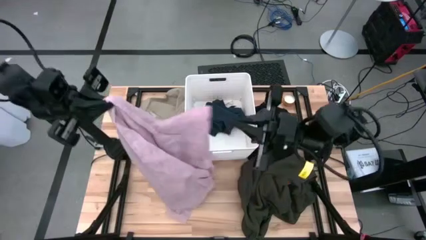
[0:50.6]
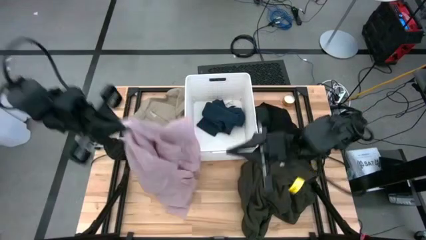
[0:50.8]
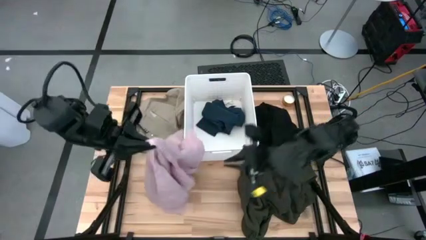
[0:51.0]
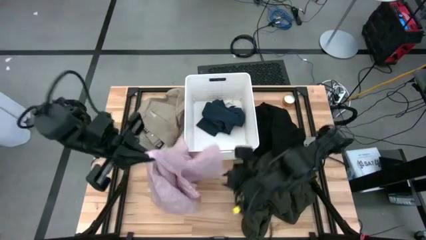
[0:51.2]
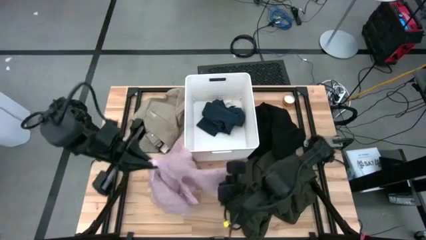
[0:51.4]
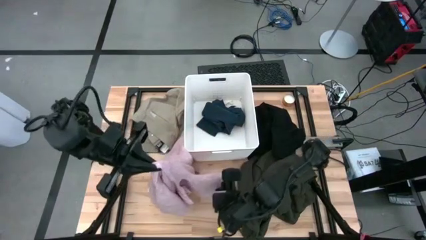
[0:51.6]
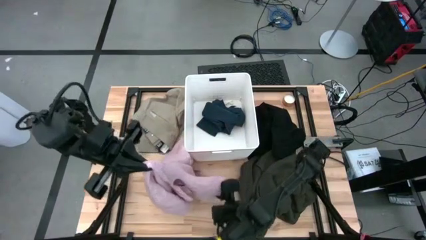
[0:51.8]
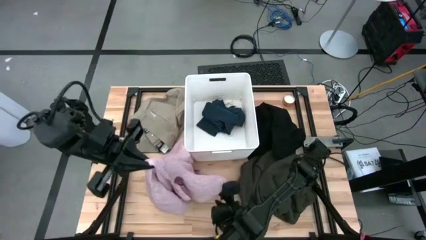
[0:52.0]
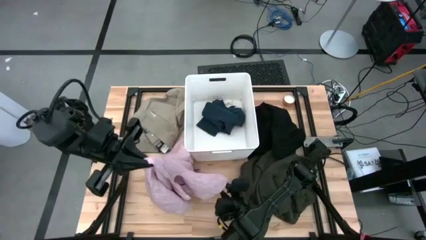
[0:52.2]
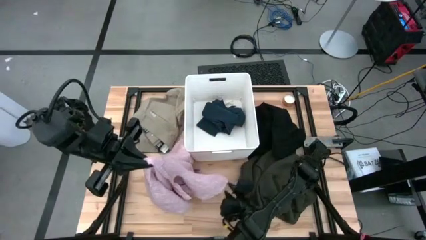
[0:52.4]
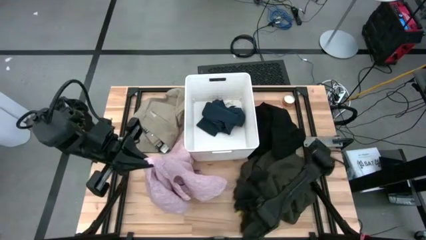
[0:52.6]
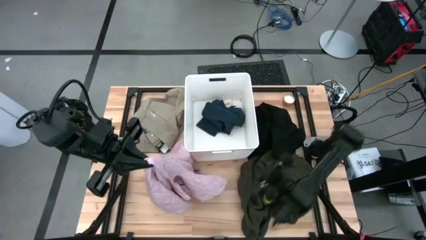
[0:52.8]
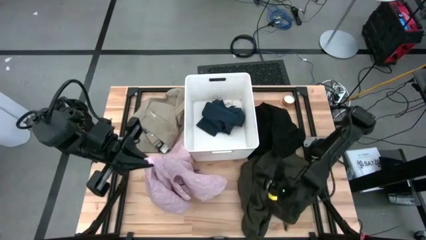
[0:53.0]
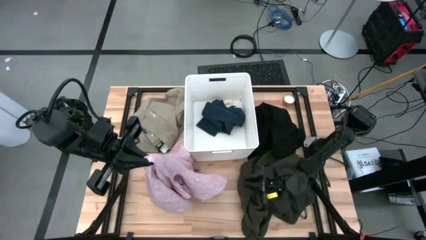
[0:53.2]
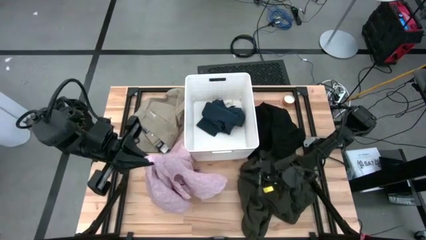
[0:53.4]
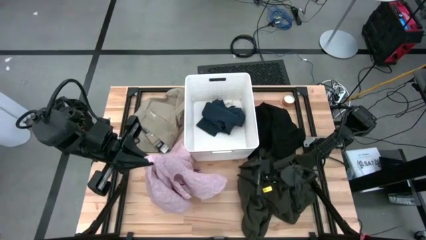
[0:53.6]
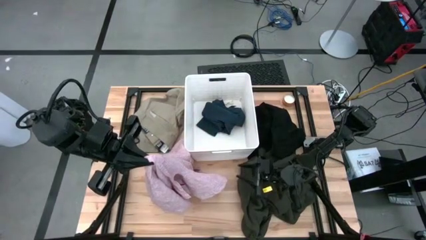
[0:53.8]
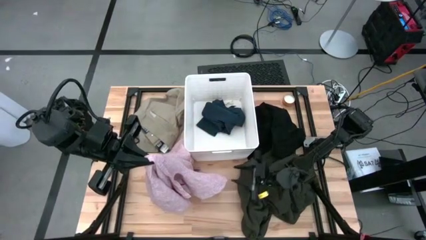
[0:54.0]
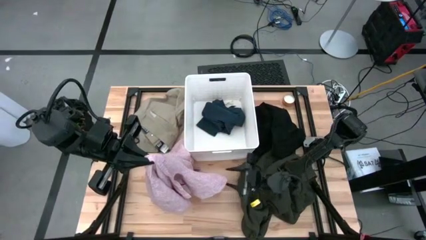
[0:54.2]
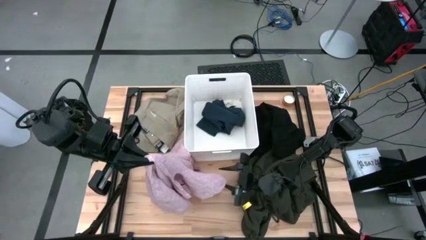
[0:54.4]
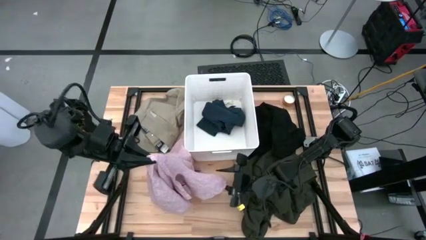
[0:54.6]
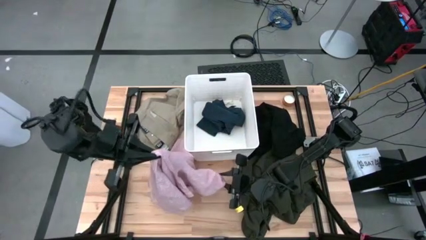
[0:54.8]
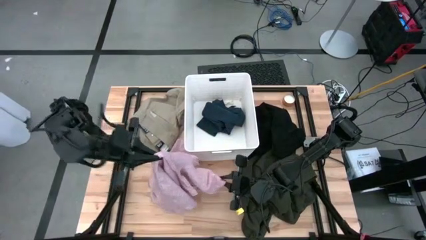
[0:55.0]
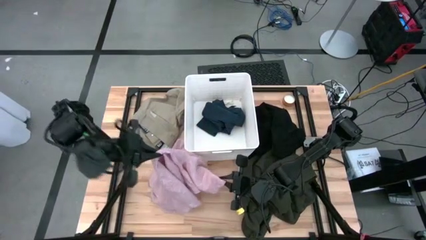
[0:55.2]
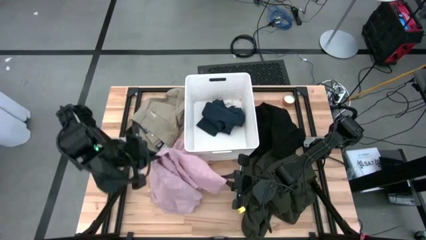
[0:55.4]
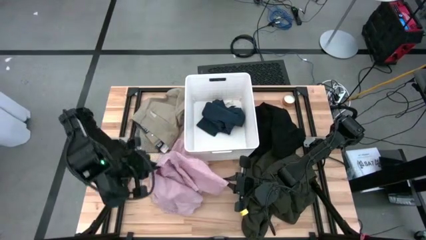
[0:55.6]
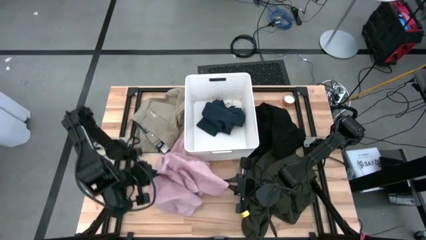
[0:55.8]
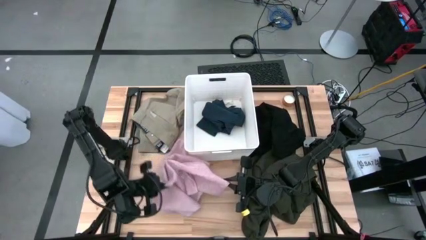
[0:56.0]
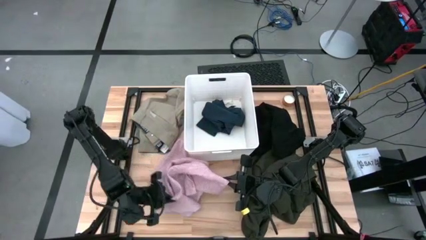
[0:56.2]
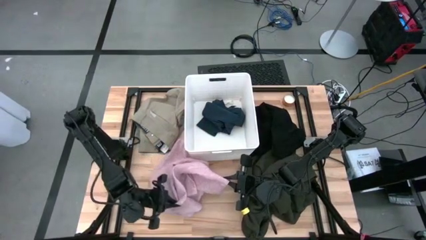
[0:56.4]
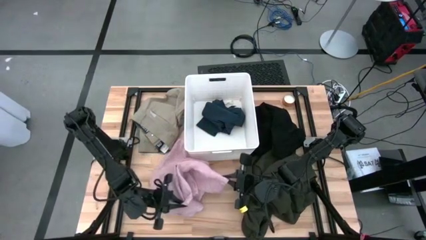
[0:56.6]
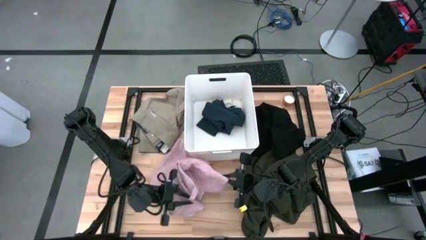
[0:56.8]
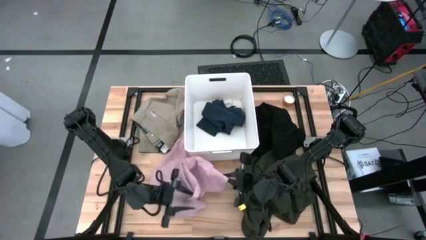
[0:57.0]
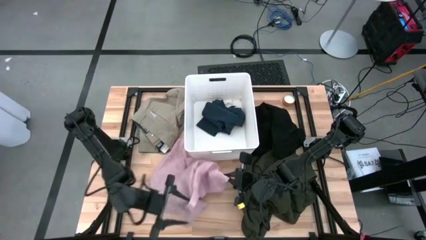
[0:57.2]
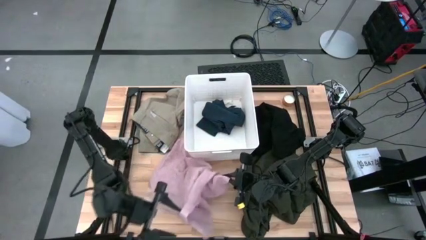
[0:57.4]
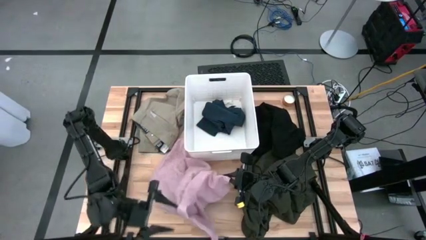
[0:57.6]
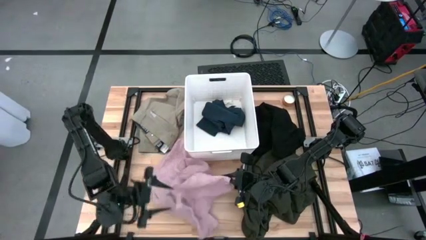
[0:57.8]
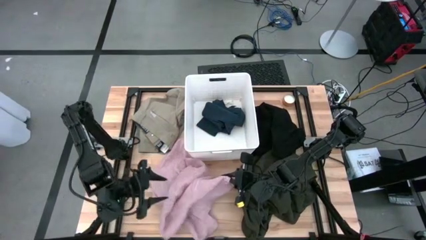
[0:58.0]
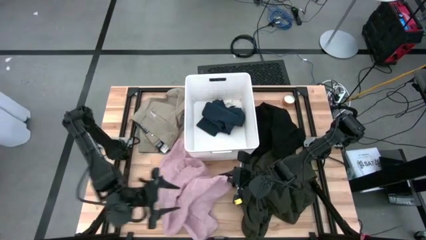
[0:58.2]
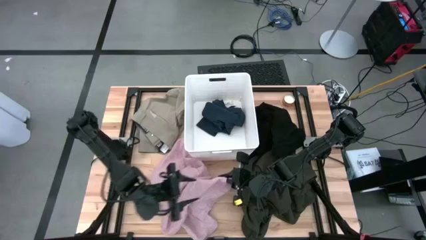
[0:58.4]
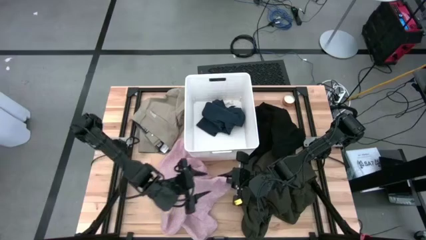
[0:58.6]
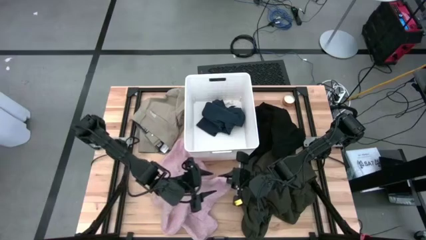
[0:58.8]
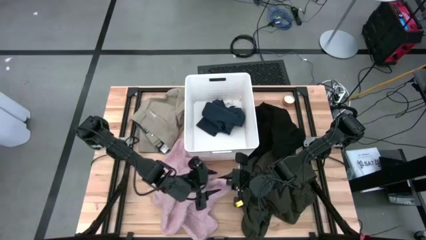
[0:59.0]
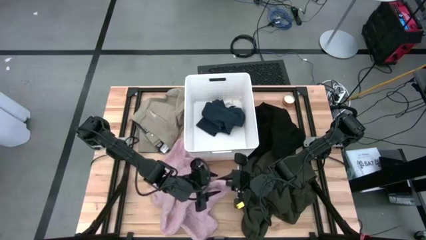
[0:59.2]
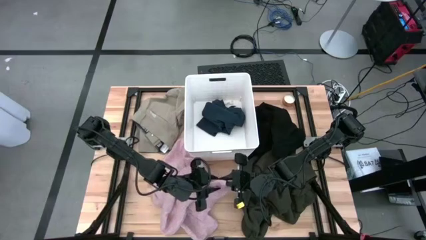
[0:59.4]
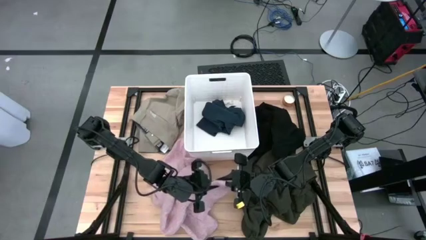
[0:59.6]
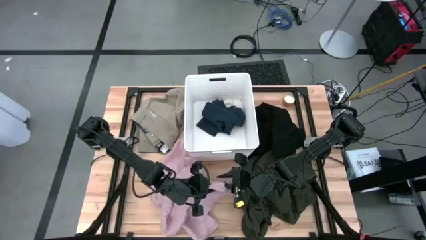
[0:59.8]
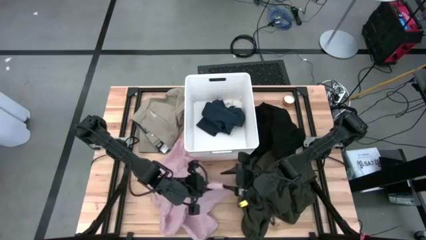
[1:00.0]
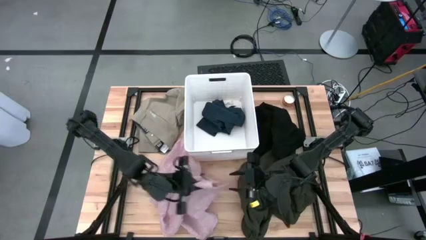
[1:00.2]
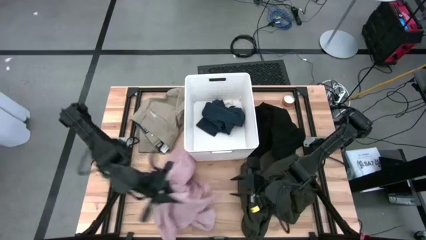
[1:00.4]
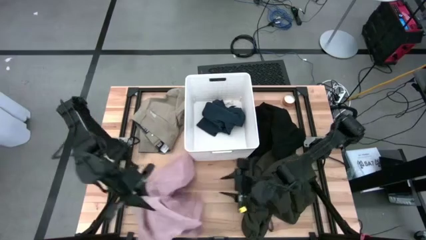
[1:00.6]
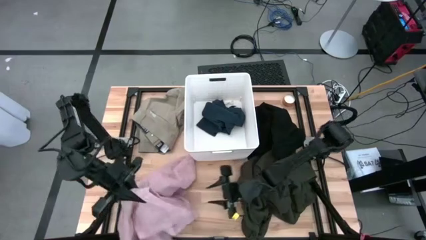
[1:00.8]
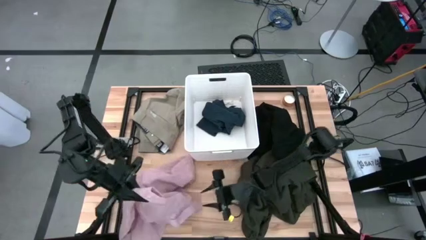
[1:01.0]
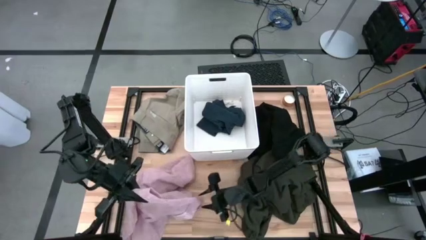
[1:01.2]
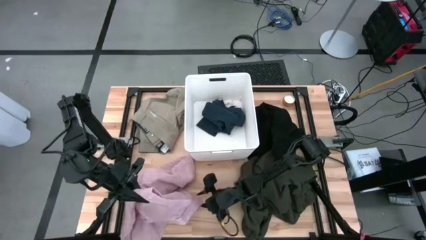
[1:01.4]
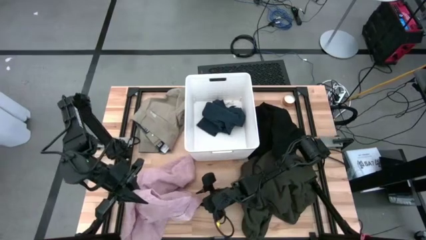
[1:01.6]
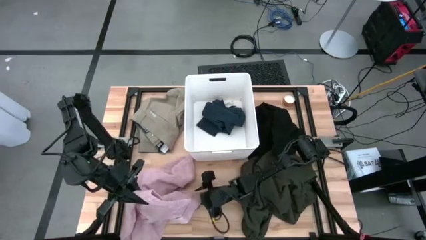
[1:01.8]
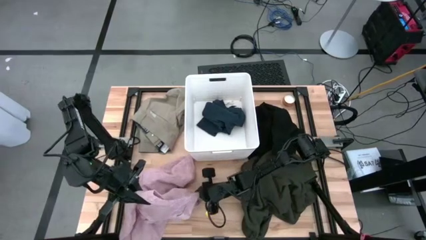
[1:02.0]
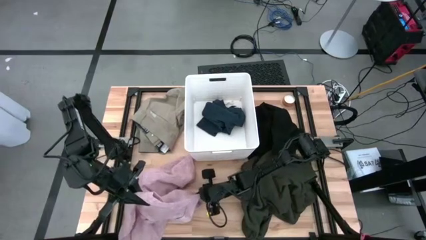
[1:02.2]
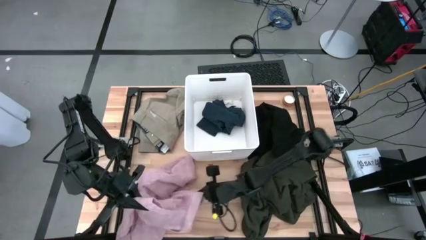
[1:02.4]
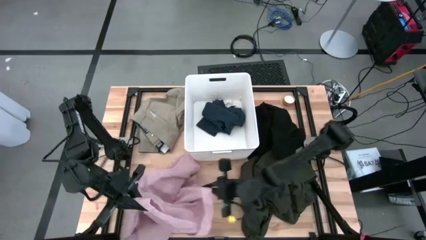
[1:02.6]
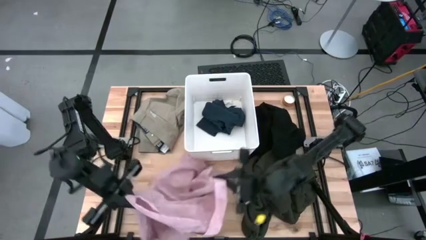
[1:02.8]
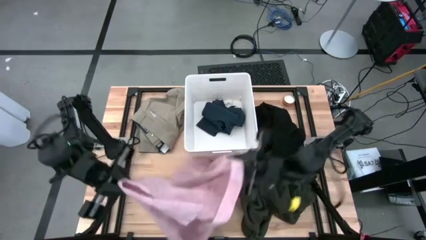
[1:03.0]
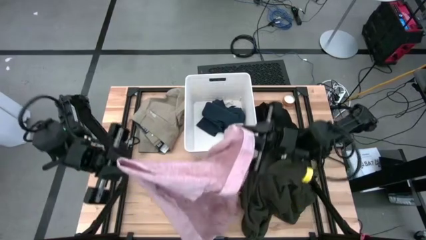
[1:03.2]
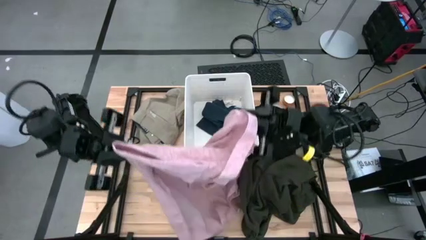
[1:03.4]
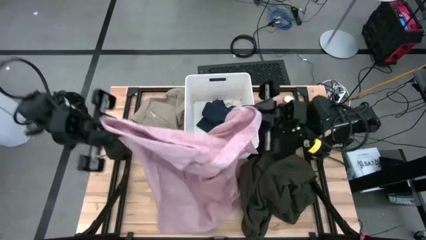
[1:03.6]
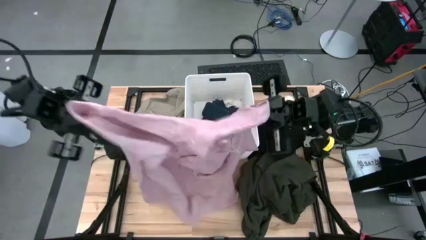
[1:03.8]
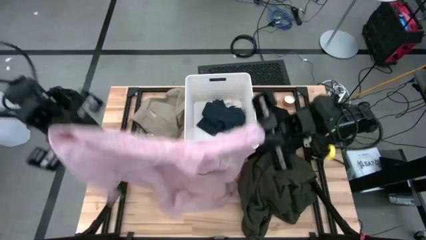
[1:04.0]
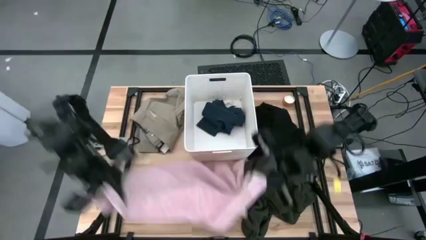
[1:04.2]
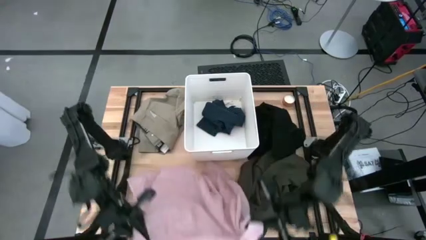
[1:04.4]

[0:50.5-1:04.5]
Task: Sort clothes
Put the pink shirt into the white laundry bin

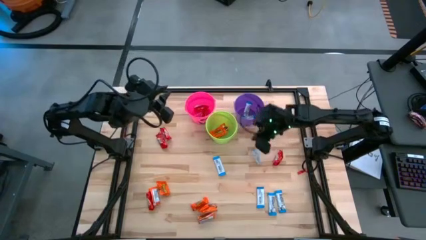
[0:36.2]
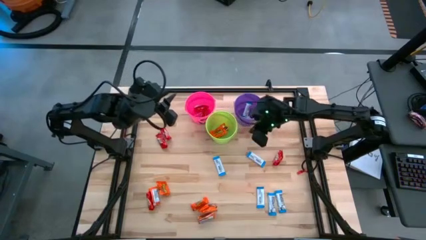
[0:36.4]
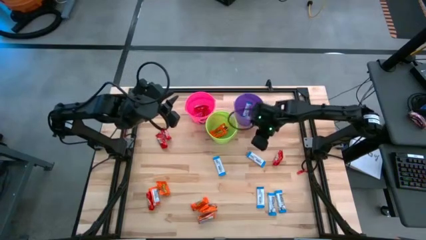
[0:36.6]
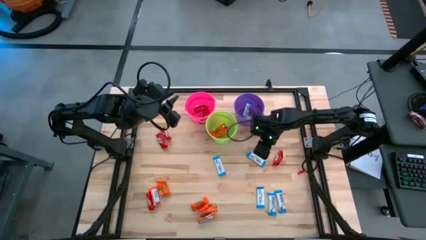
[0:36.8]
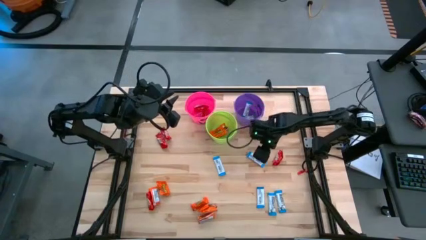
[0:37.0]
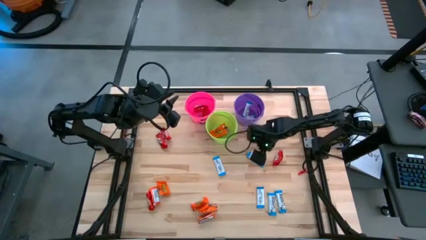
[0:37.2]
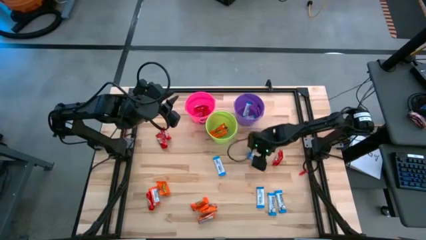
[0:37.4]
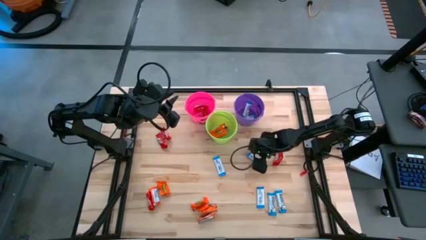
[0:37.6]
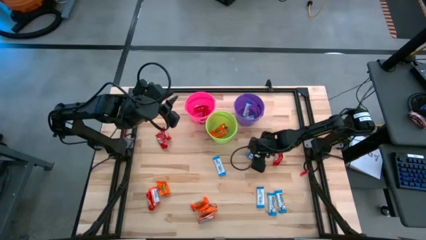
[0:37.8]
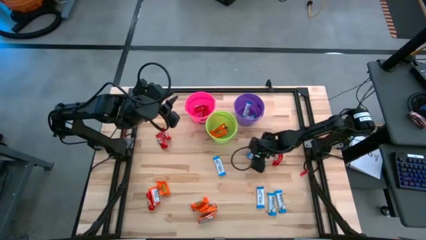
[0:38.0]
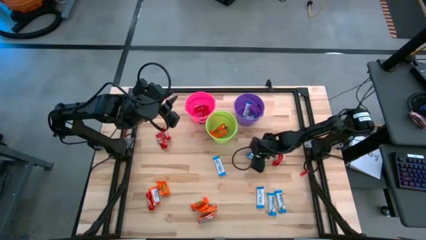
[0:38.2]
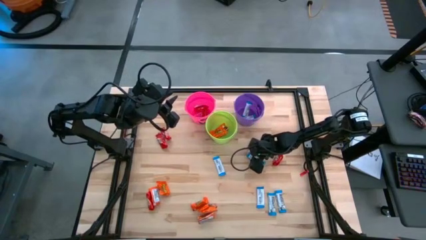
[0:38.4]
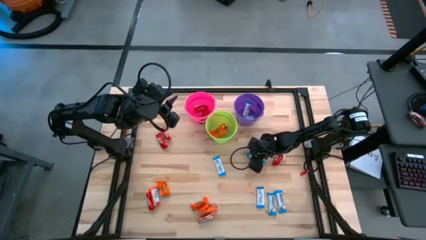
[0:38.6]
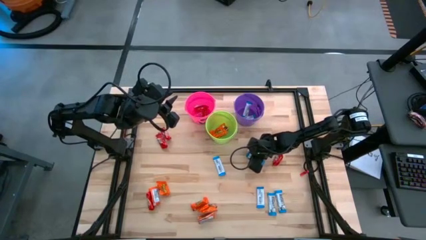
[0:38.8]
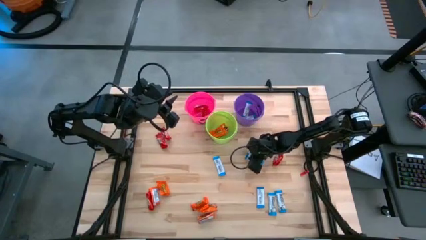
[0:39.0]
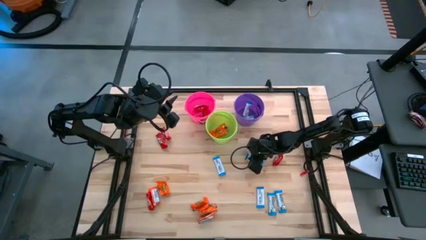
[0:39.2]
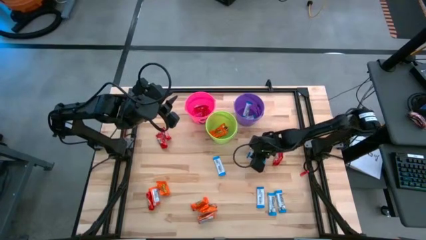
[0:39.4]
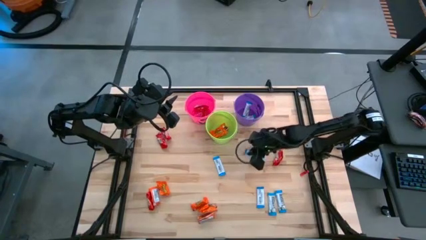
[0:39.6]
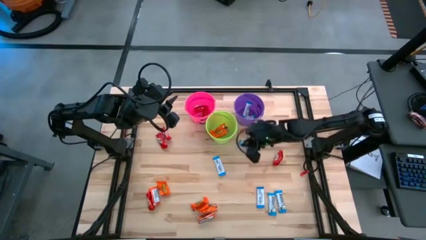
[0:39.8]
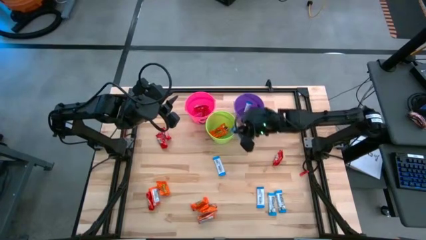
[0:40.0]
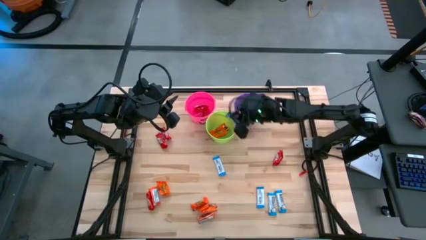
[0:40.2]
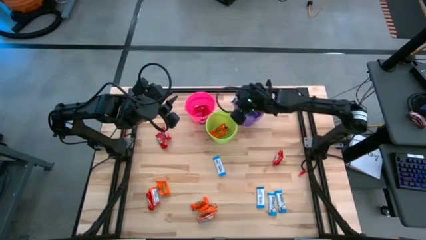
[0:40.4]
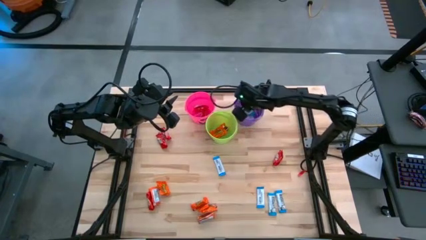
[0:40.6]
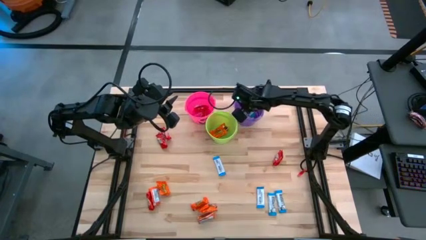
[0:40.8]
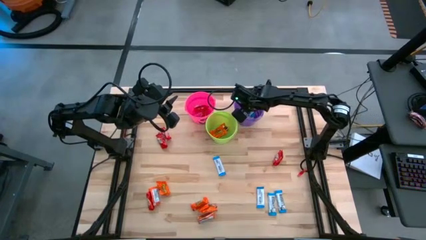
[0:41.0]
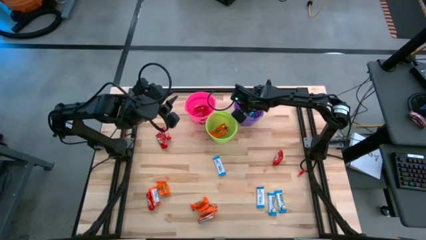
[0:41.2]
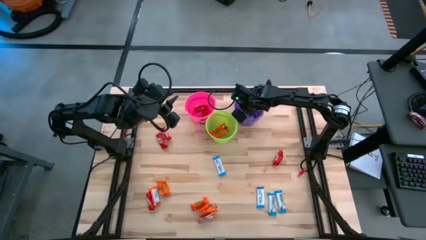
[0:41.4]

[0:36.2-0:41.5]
Task: Sort candy
Put the blue candy into the violet bin
